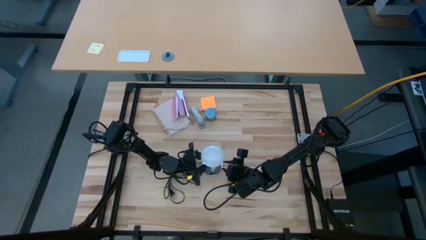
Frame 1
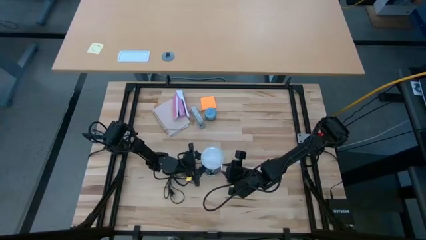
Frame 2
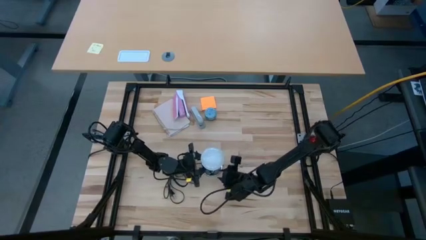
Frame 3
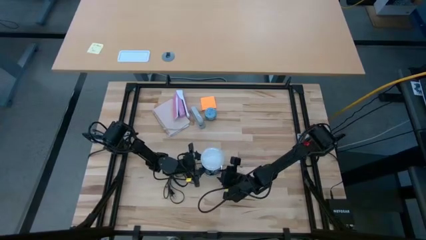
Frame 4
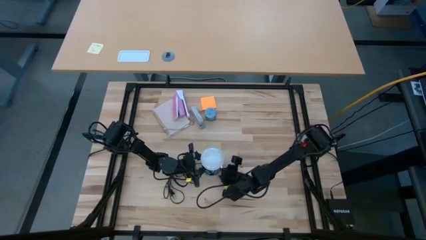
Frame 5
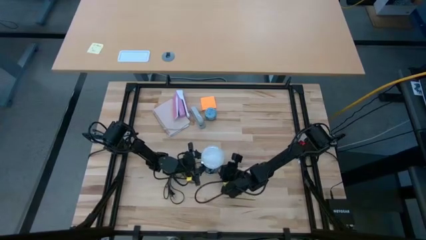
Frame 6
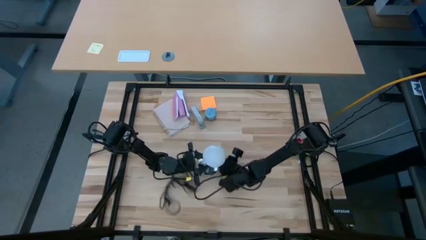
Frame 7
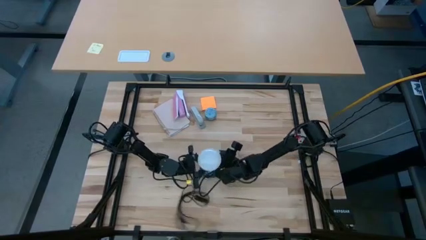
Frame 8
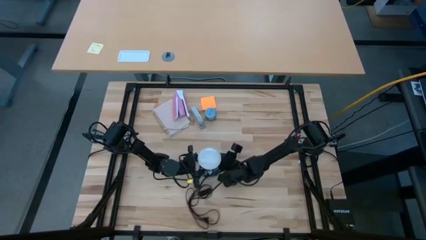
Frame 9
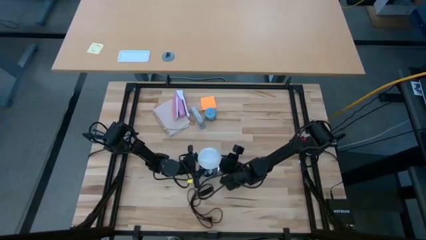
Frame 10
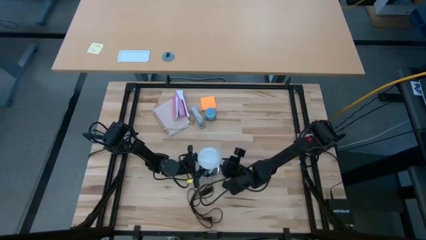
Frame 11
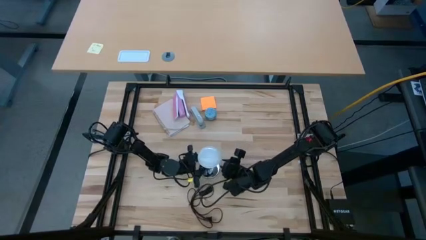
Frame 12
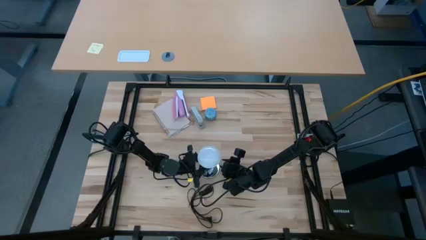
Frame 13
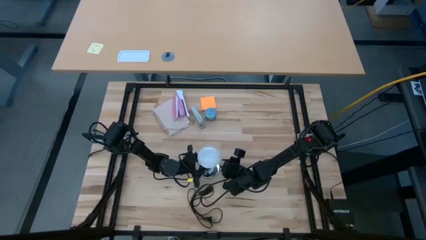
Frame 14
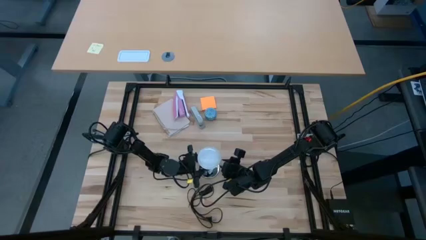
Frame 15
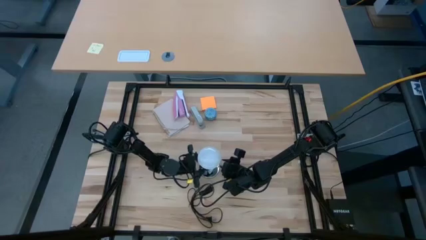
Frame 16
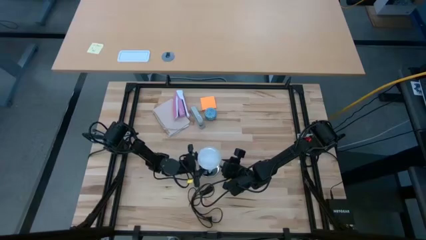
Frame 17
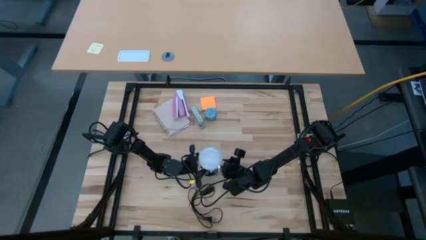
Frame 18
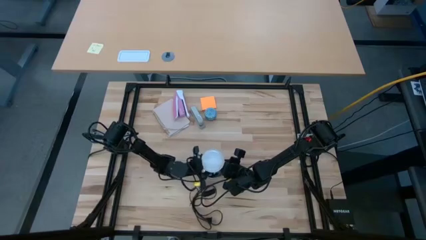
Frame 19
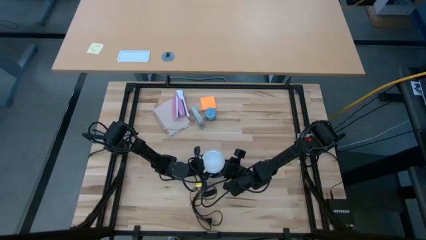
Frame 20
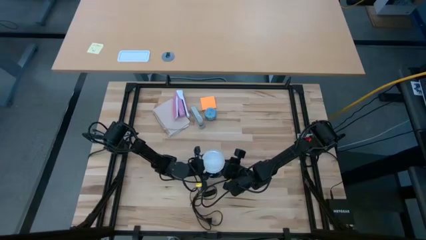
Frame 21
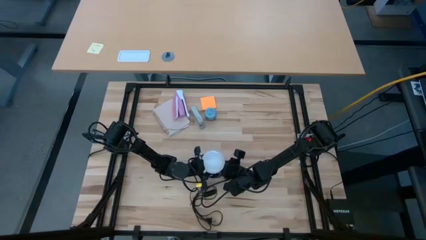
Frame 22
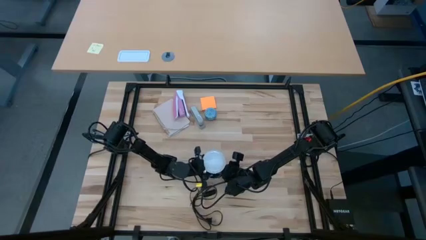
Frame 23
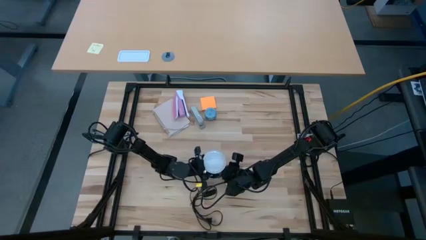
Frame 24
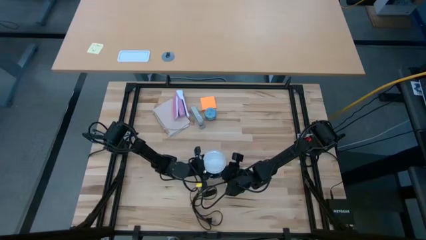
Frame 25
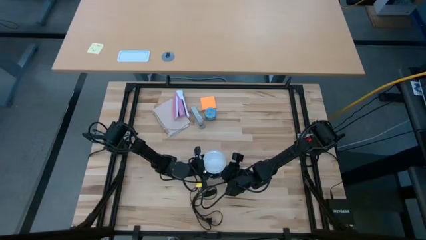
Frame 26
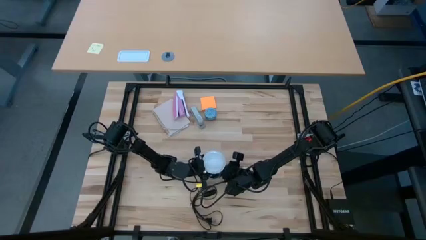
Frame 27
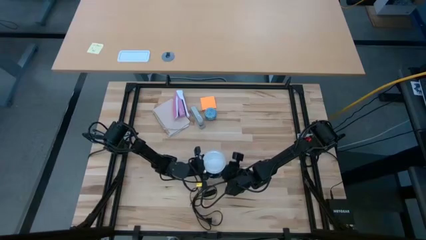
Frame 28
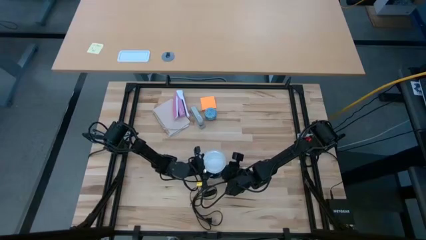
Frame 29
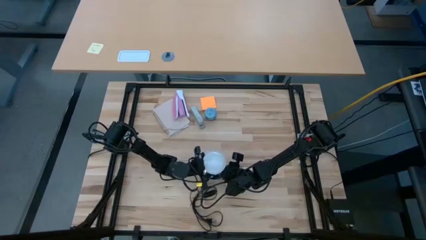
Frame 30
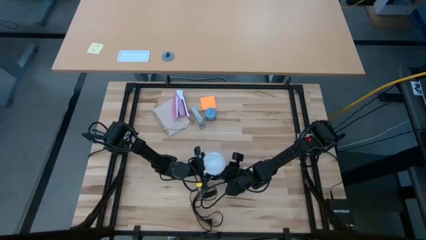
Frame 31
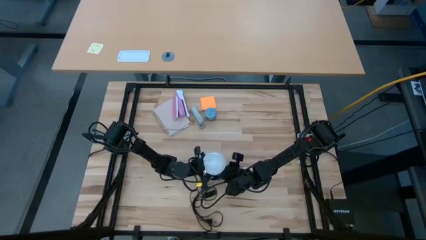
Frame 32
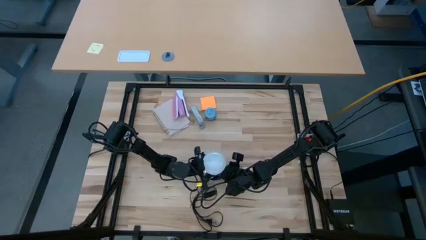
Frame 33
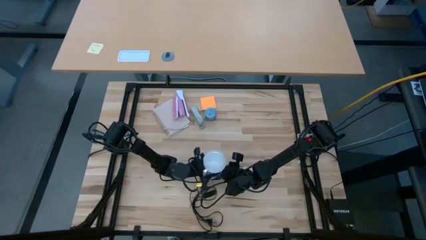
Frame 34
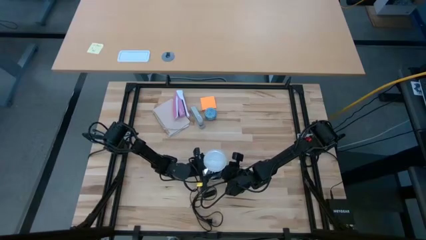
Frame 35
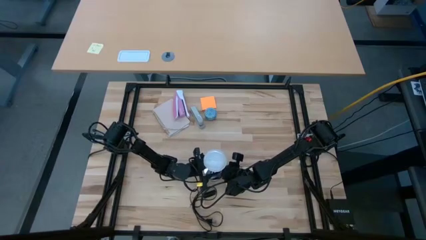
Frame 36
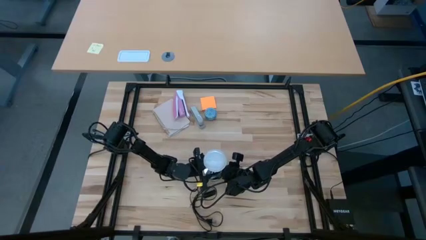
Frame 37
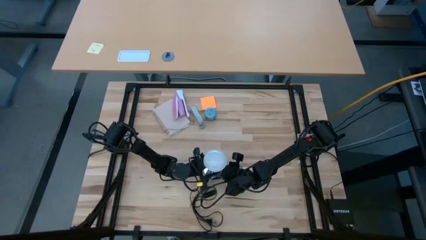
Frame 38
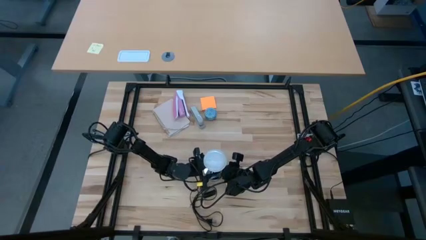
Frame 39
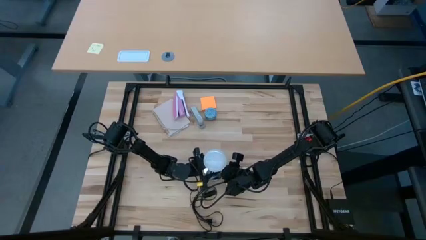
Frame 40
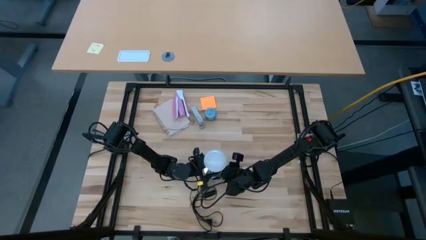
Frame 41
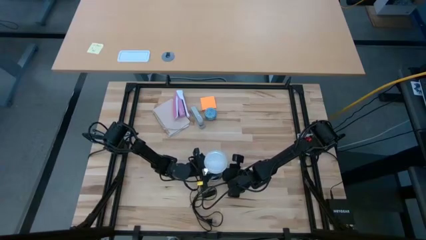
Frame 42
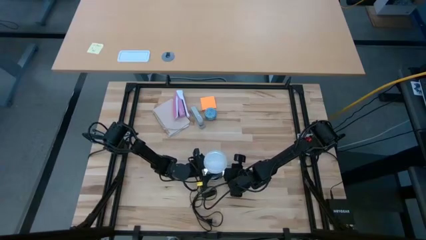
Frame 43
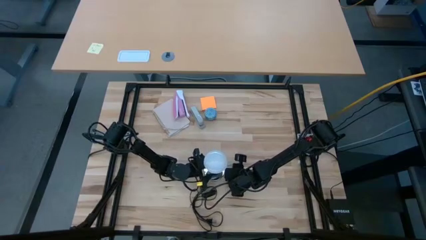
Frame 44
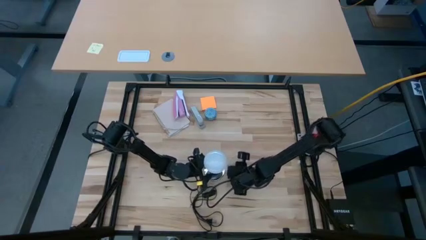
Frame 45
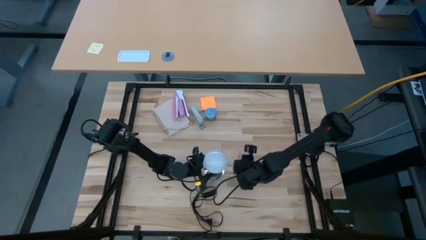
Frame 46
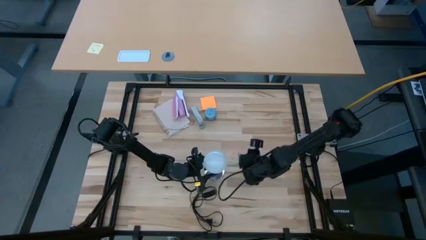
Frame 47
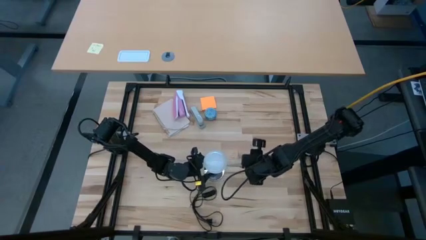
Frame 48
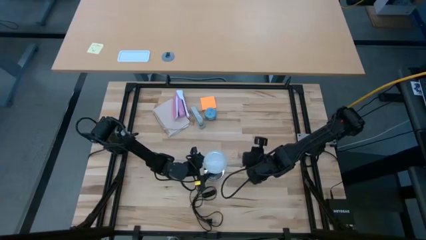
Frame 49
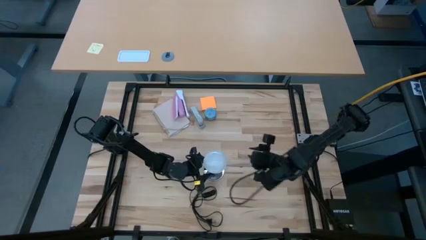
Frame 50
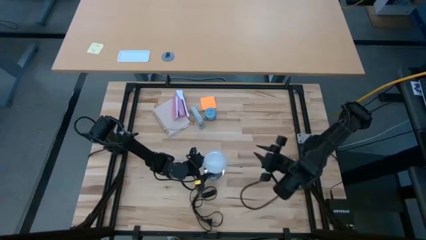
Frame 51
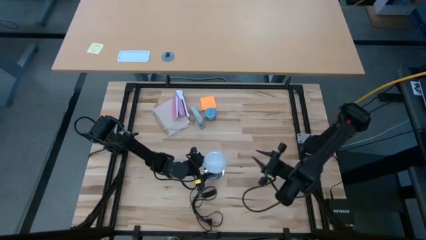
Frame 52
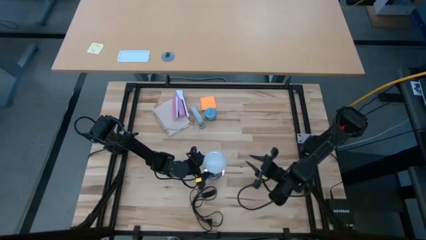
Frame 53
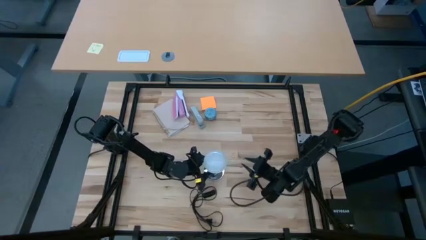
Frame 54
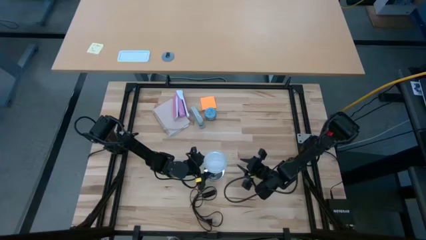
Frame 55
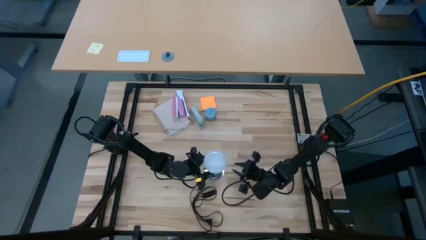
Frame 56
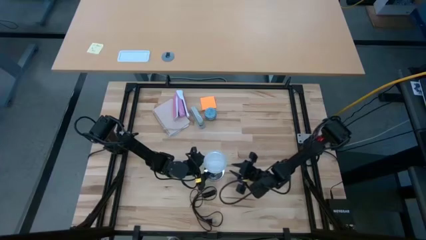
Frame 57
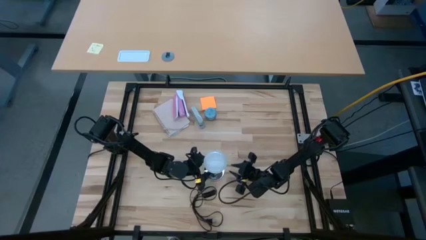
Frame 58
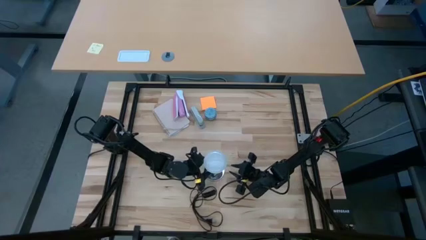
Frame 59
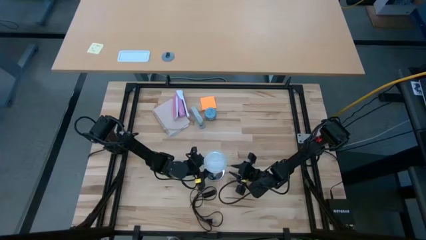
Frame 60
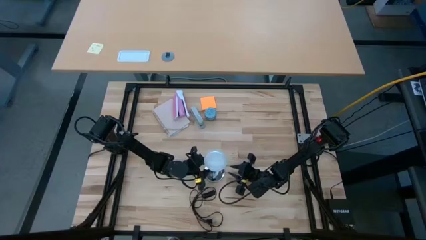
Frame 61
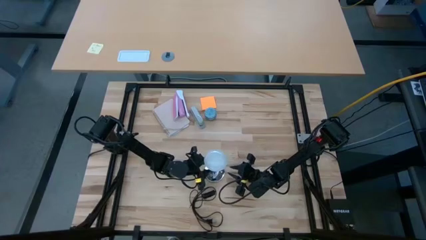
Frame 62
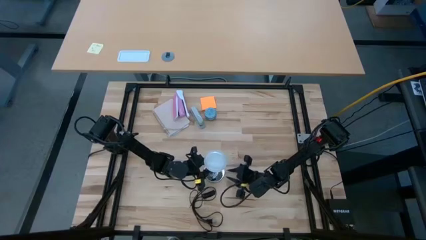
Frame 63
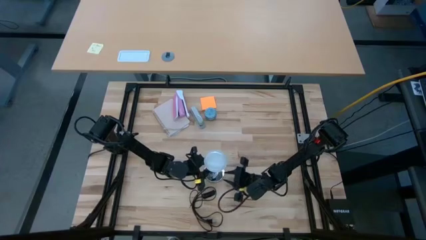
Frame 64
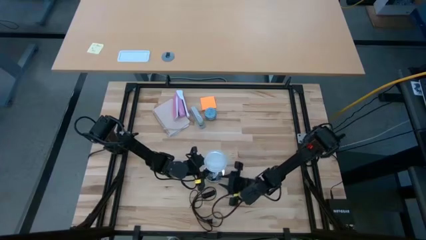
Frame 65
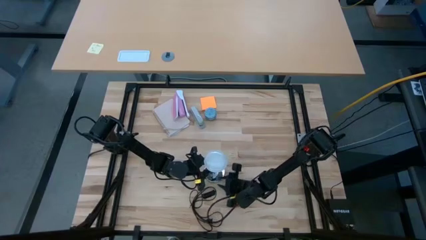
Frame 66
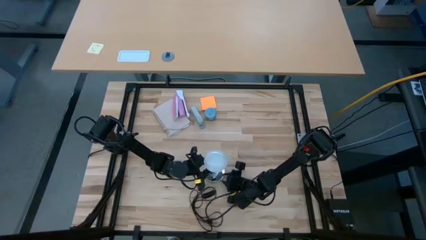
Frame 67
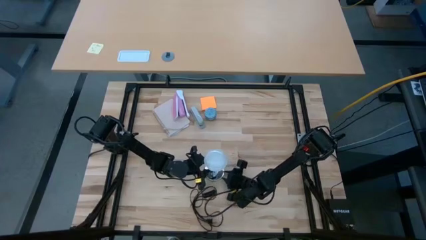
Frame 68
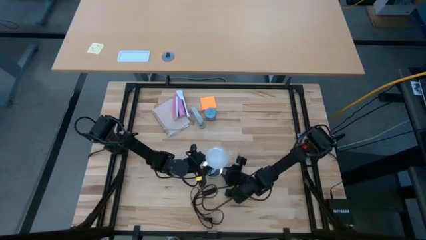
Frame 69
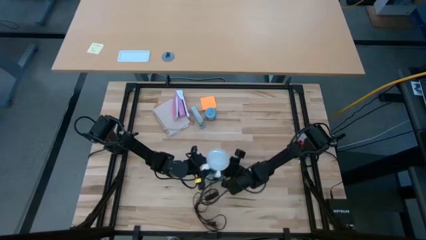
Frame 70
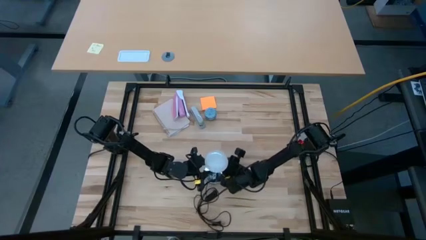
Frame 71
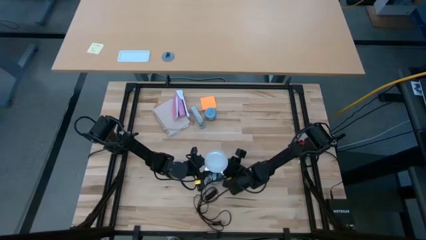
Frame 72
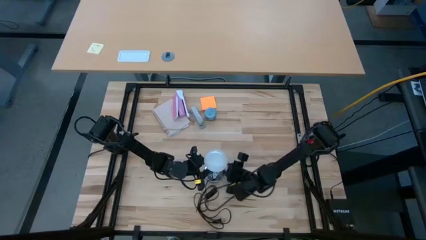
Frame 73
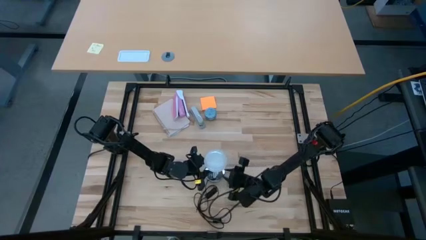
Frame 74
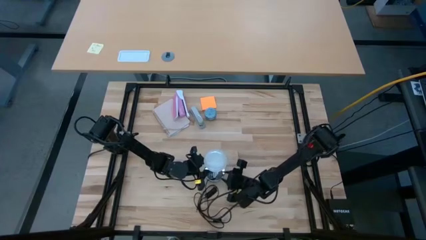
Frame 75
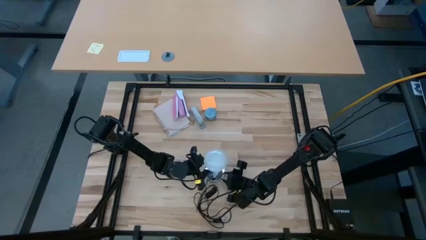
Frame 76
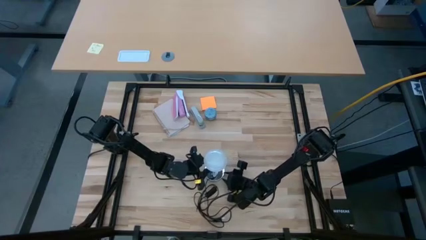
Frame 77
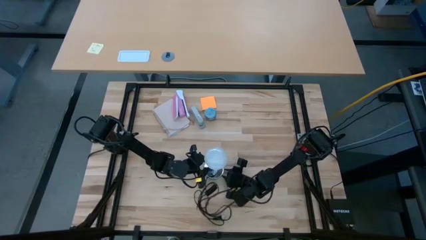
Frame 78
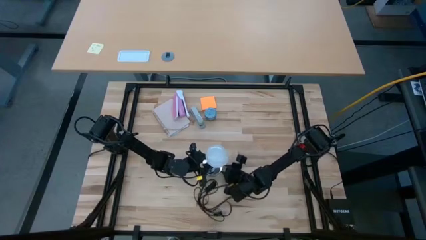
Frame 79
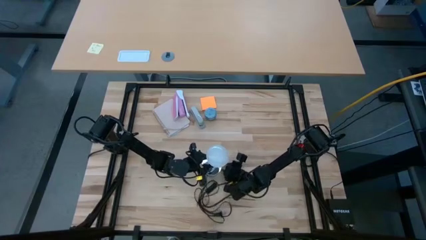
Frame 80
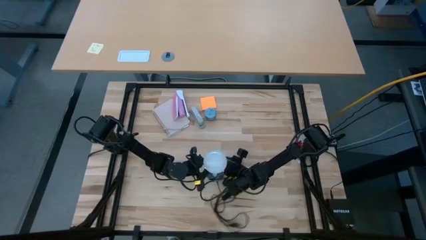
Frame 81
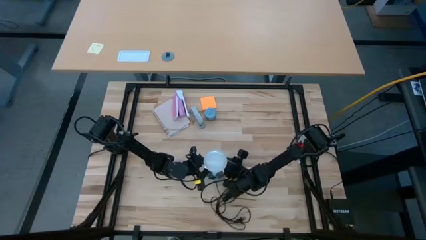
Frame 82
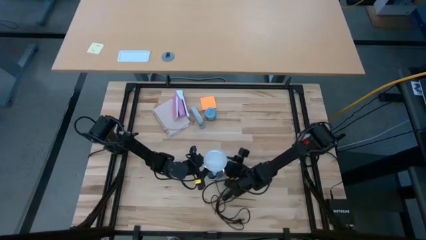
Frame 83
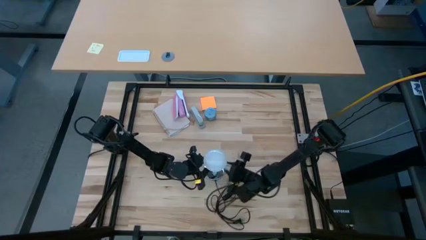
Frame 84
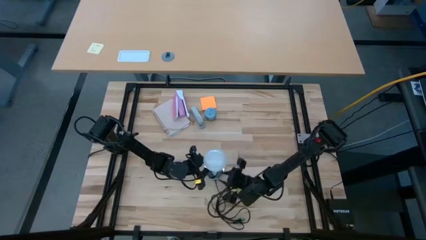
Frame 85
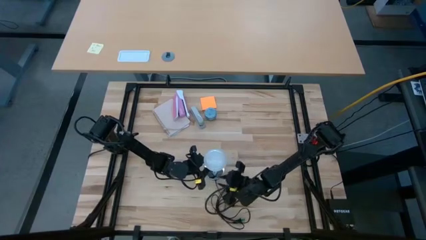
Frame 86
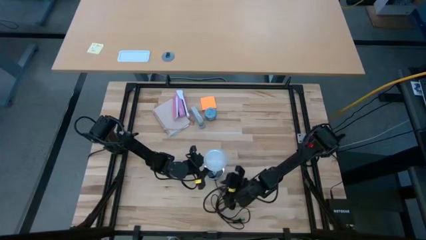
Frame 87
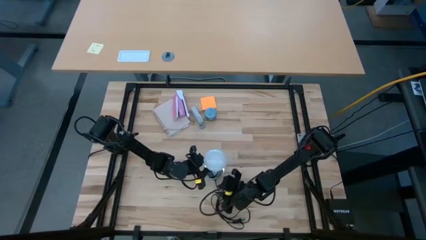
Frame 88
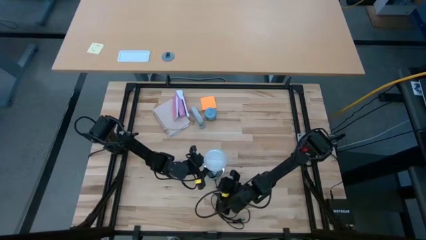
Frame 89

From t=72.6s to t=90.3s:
Task: Screw lightbulb
Insert the white lightbulb into the silver lamp
